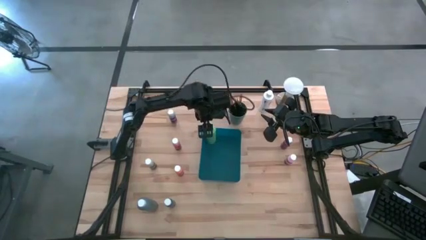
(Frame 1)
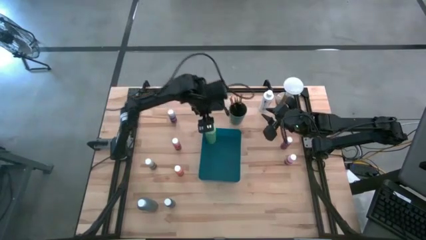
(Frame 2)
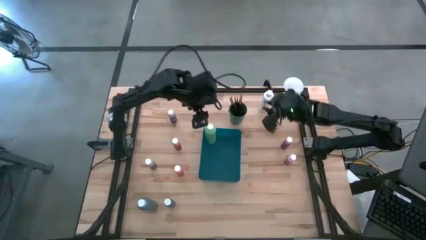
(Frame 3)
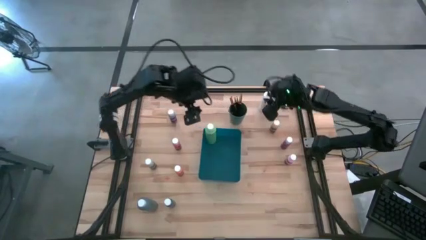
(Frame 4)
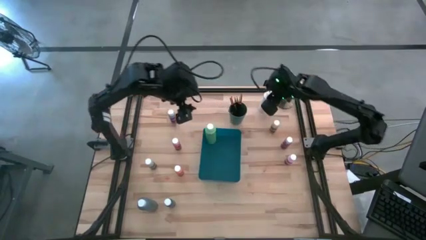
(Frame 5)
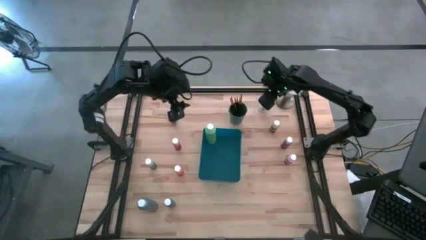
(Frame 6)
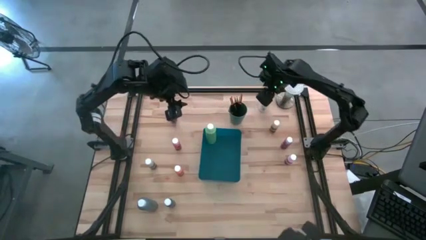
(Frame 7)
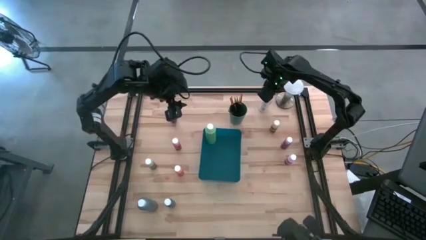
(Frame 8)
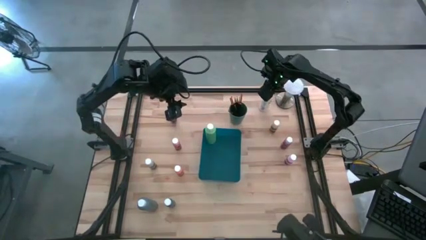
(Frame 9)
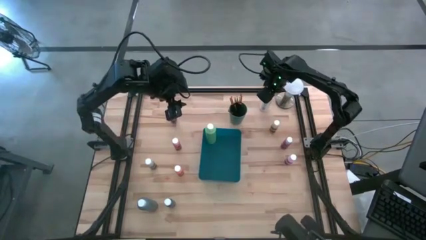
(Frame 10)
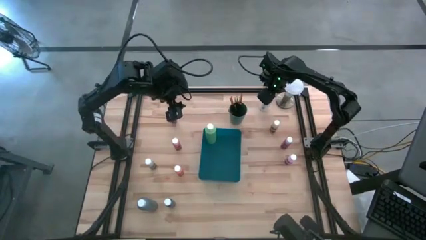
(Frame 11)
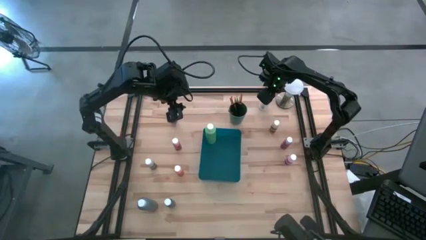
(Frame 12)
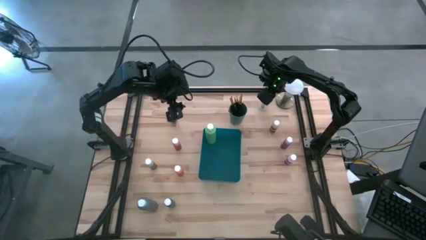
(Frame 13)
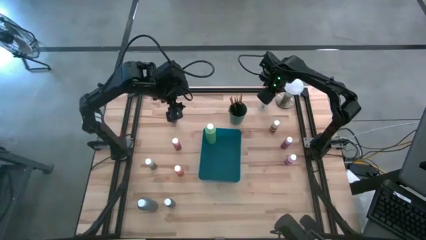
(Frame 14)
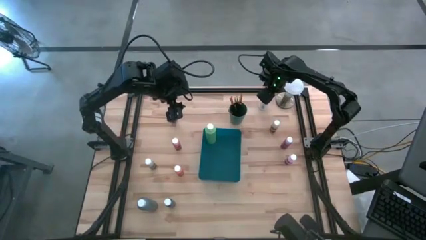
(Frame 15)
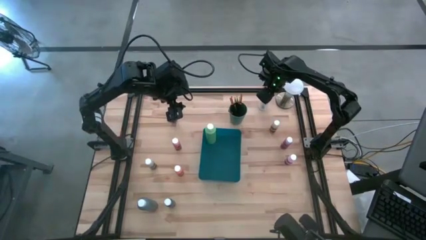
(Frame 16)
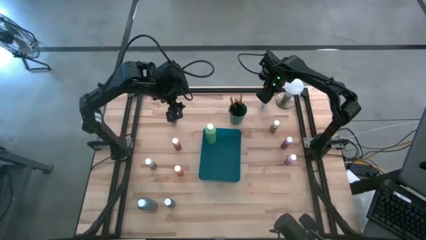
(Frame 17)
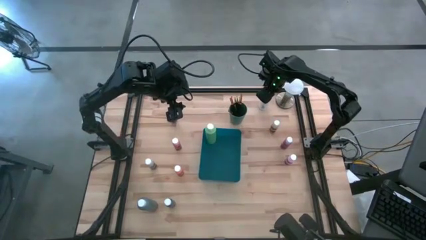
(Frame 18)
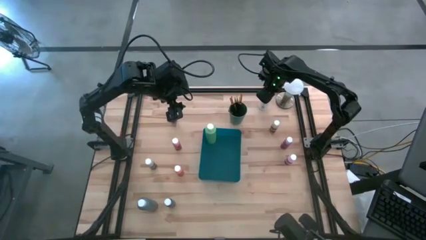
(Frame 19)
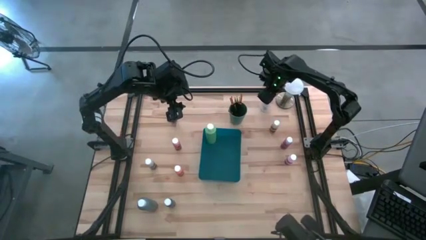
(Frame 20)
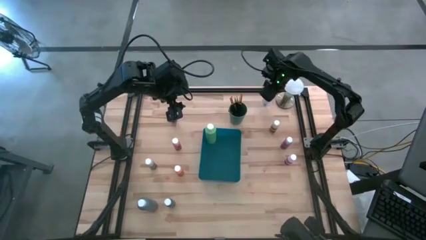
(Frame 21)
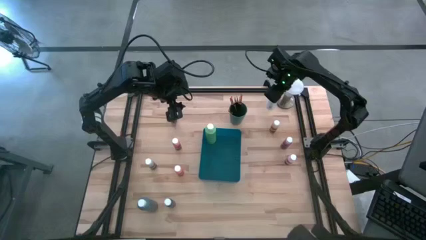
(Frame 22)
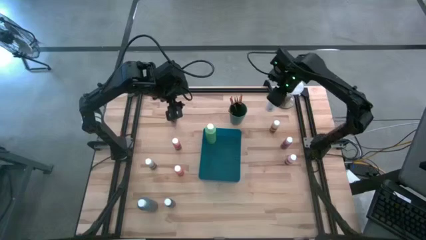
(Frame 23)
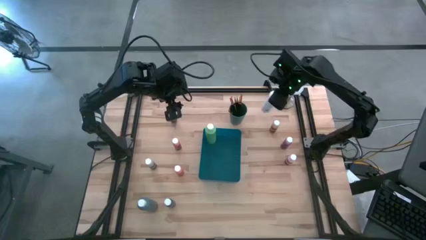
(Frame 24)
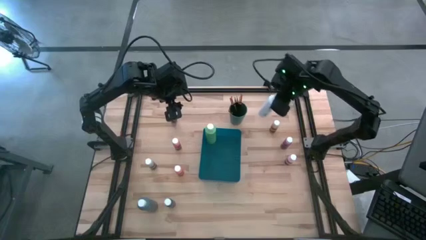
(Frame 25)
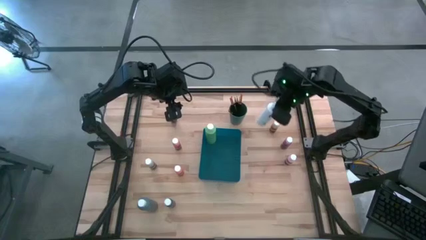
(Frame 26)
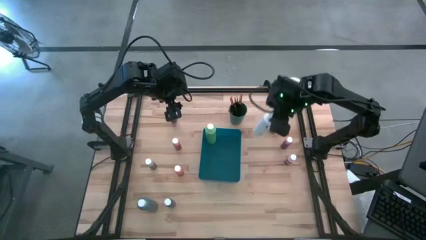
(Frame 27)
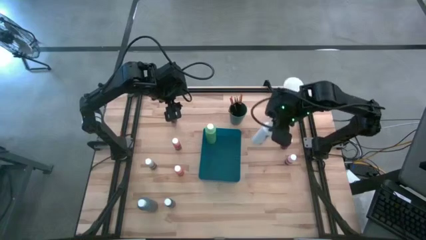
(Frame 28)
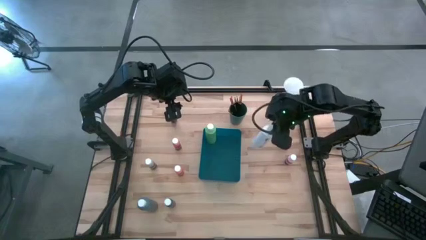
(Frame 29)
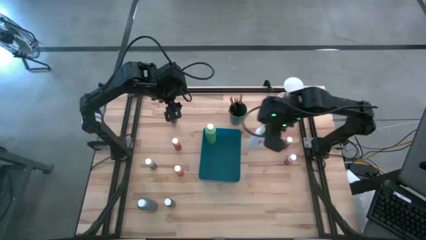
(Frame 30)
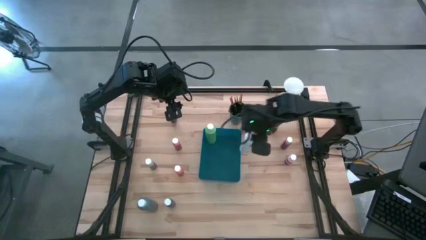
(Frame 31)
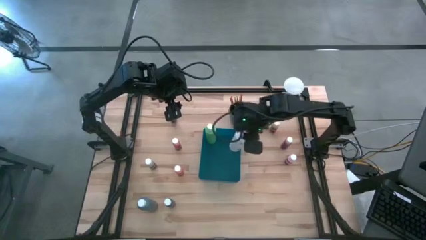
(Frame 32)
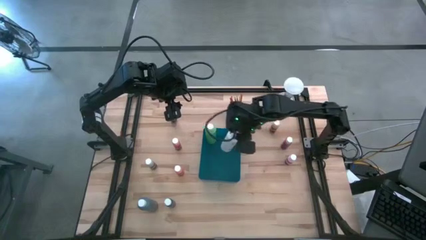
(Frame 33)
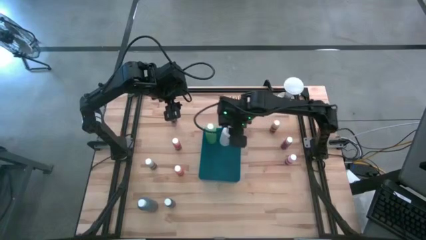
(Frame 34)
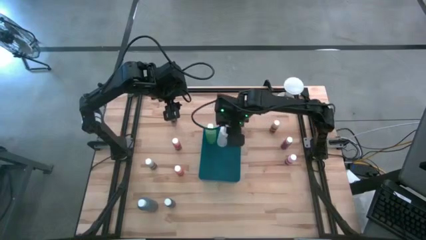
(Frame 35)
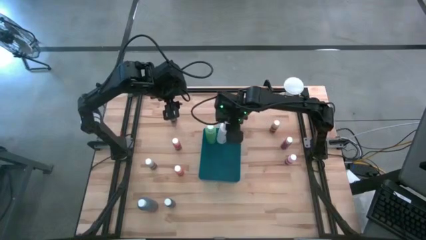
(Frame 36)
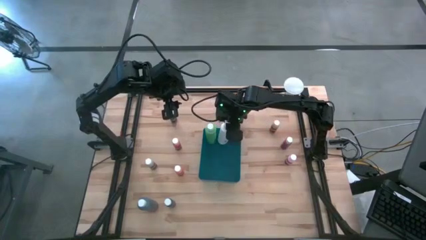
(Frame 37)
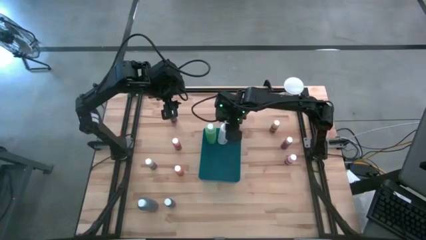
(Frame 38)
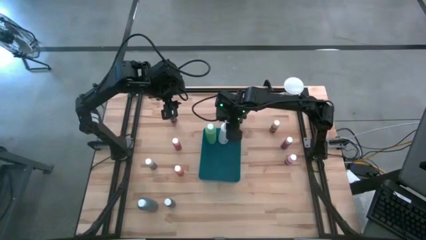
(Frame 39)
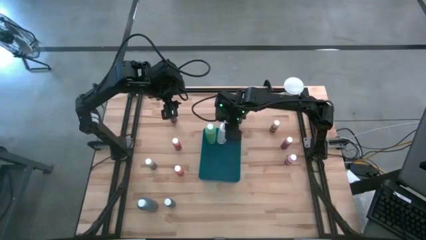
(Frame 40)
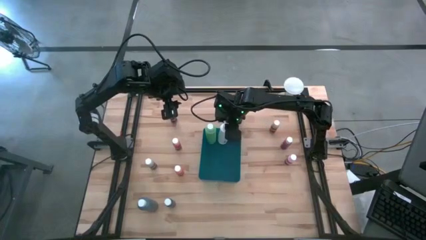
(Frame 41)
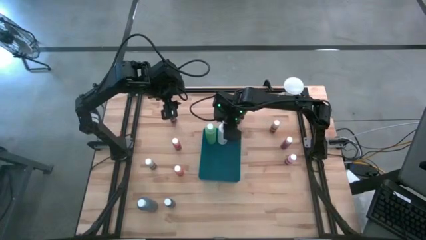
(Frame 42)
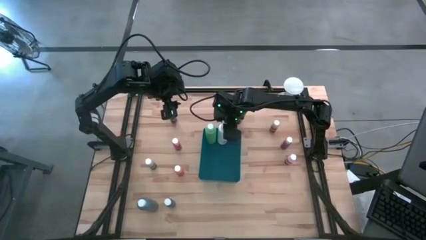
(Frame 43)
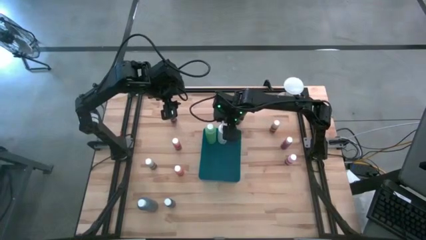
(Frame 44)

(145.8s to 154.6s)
Task: Pick & Place Paint Supplies
Put the large white paint bottle into the blue bin

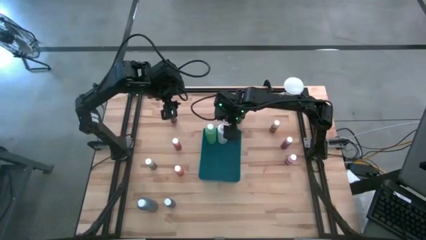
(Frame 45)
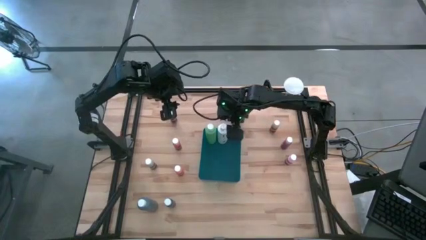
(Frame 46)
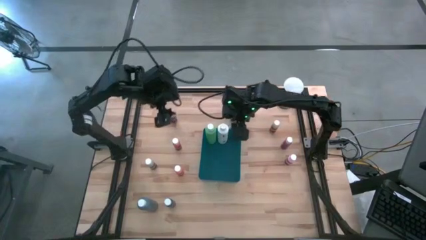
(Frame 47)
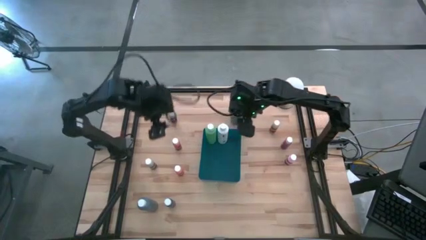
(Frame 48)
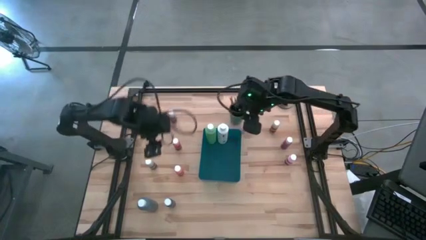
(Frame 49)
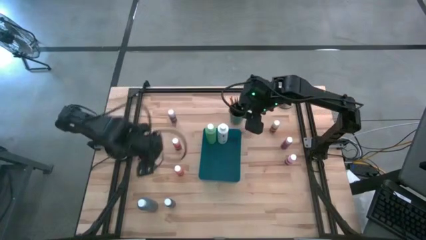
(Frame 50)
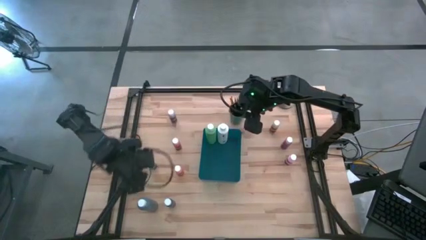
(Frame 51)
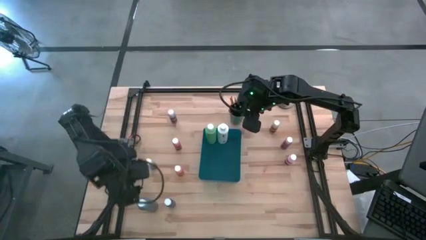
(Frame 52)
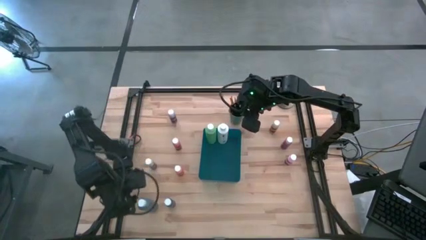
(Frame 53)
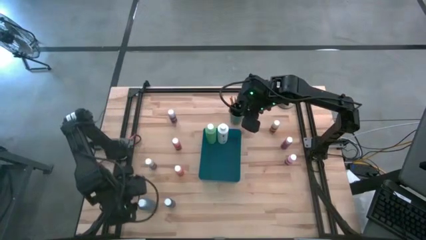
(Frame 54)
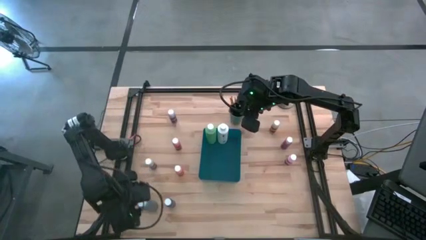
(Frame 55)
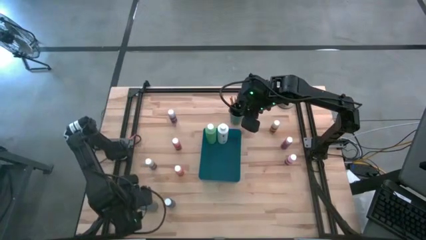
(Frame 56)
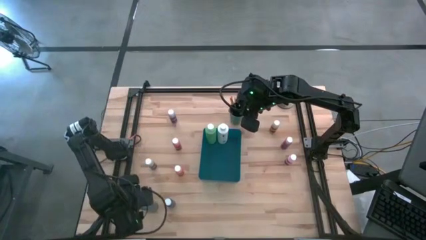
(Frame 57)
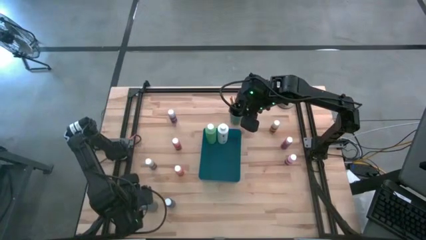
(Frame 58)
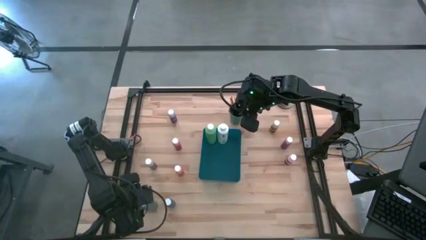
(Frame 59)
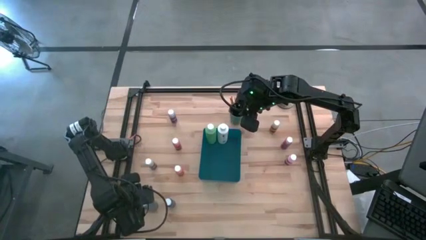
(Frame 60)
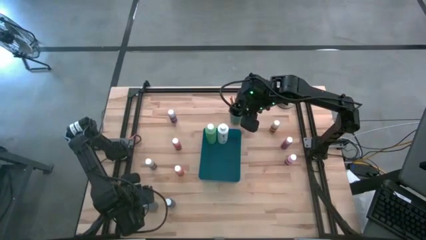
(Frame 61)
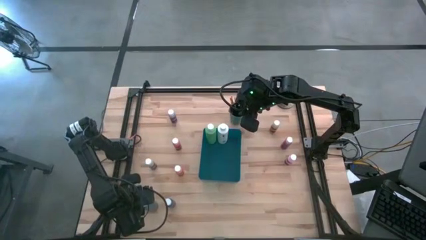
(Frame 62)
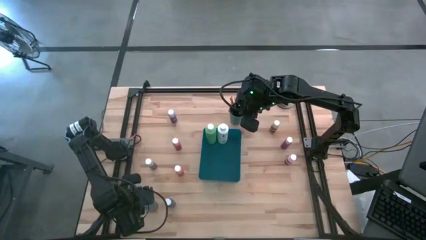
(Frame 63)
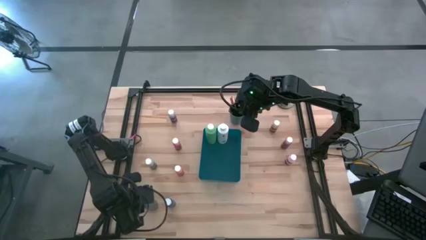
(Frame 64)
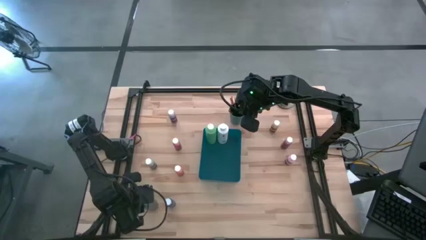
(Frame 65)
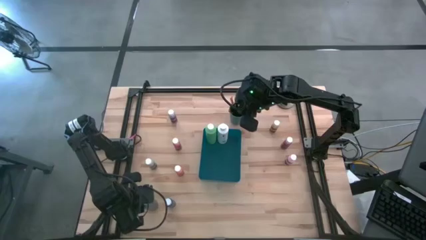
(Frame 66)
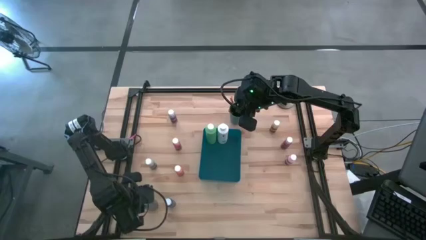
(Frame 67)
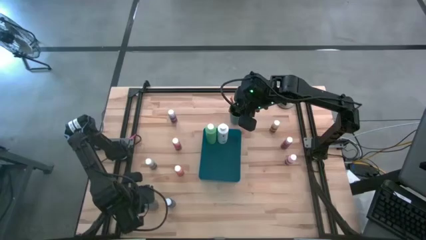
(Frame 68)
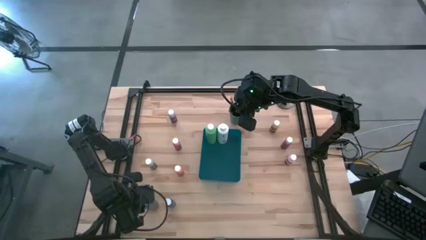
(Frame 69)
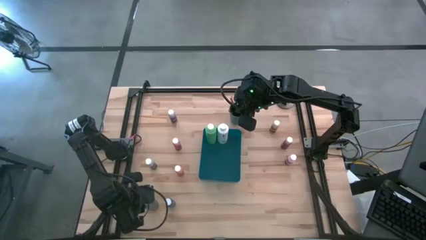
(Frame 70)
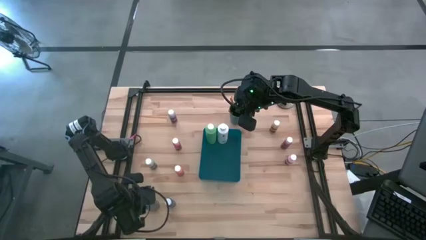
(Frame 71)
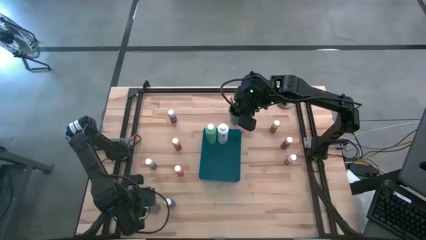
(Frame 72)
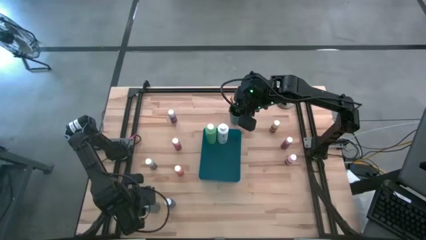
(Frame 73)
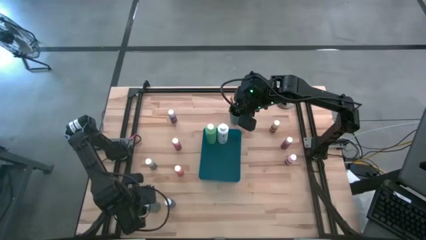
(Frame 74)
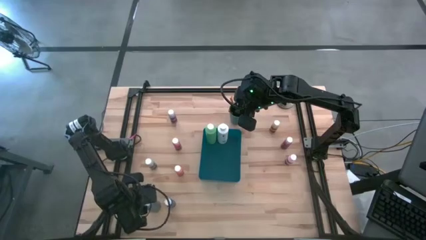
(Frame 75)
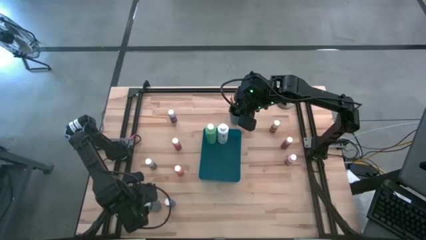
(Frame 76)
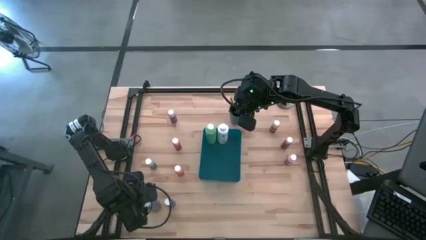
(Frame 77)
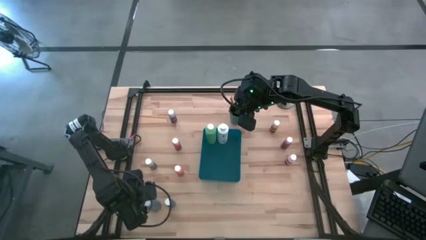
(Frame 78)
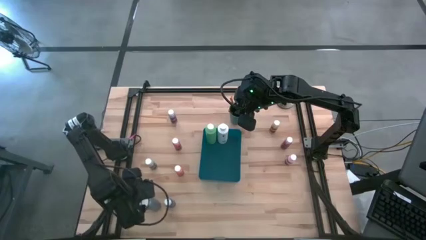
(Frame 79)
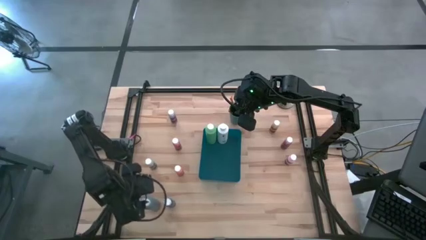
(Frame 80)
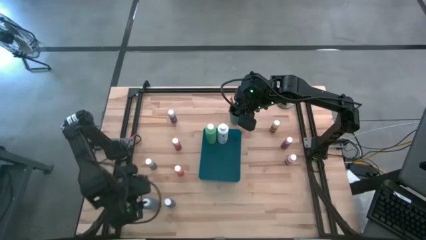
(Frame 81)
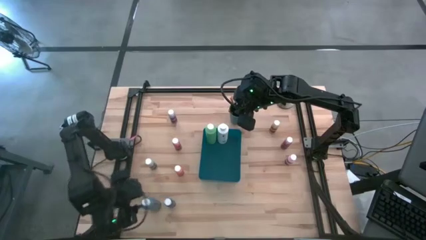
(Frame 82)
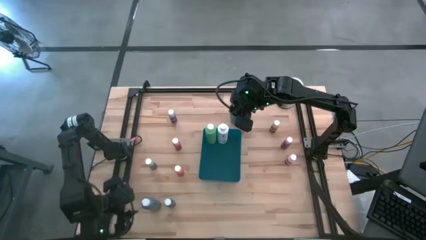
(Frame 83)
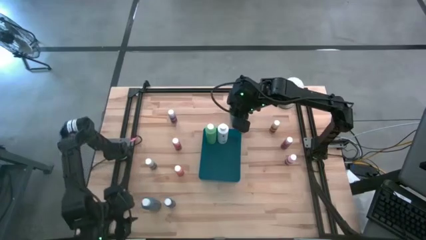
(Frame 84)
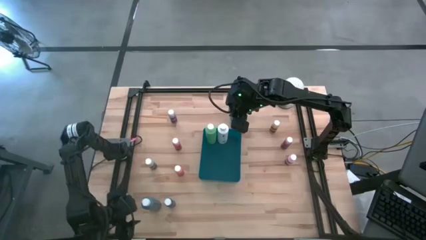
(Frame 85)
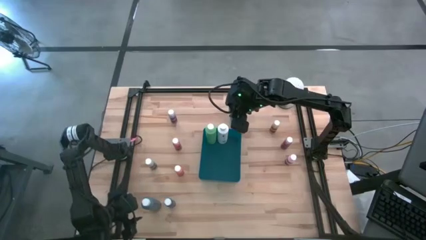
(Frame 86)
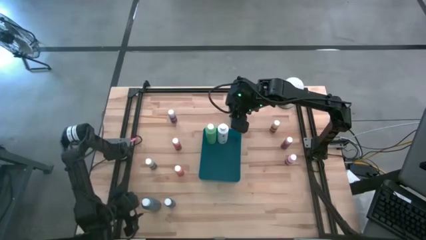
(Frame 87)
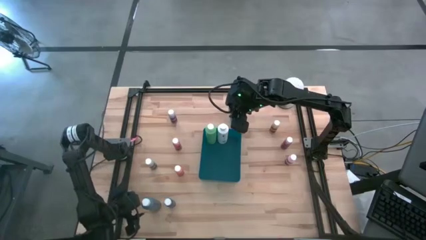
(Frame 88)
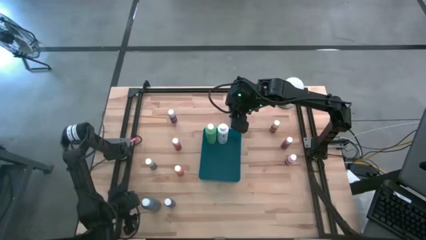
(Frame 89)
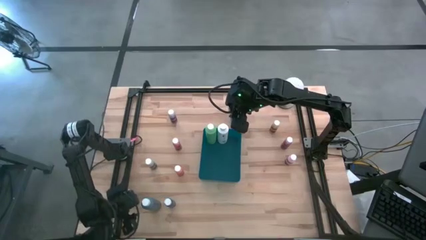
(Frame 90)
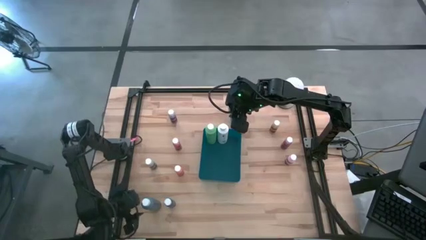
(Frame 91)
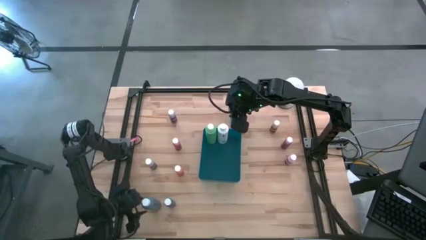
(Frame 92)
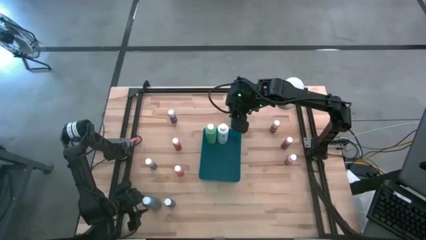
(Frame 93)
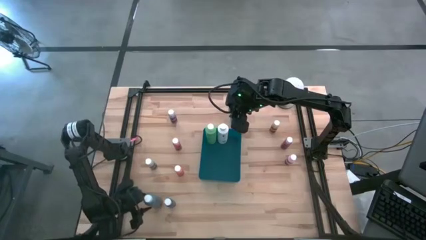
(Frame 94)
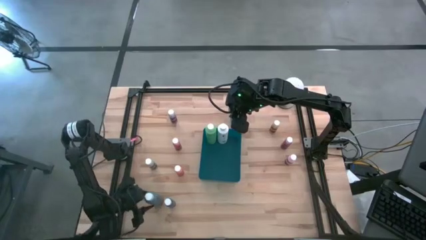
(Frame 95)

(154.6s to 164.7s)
Put the large blue paint bottle into the blue bin
